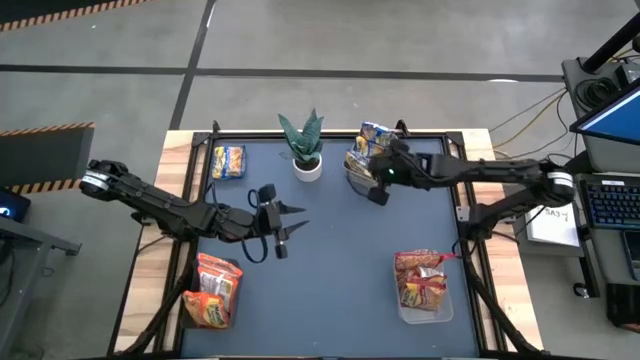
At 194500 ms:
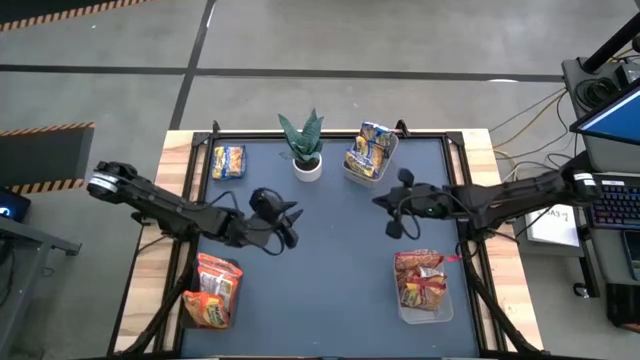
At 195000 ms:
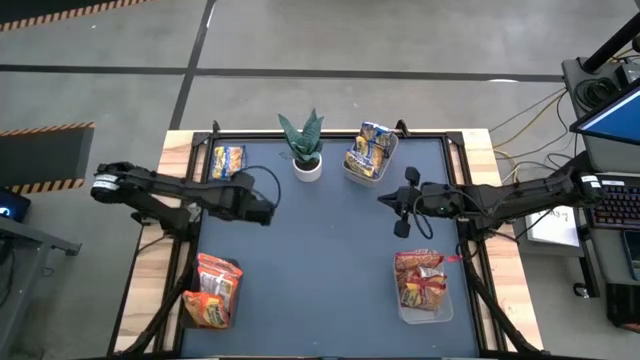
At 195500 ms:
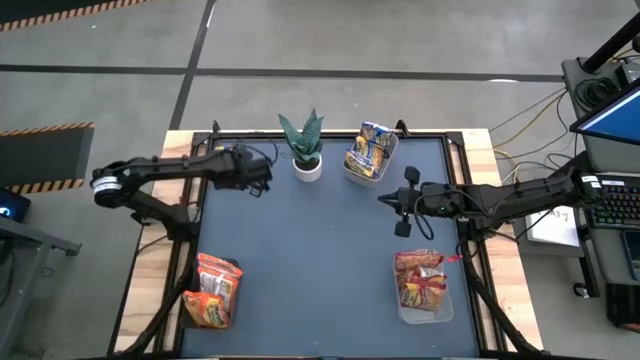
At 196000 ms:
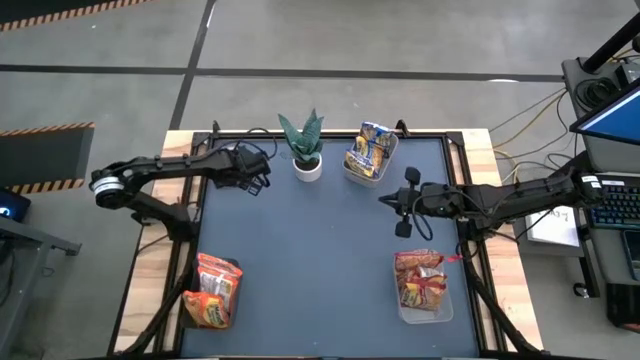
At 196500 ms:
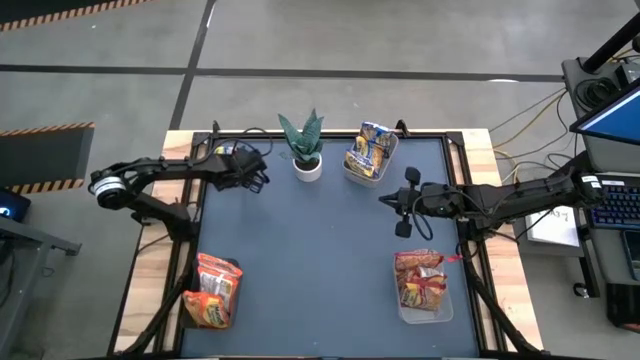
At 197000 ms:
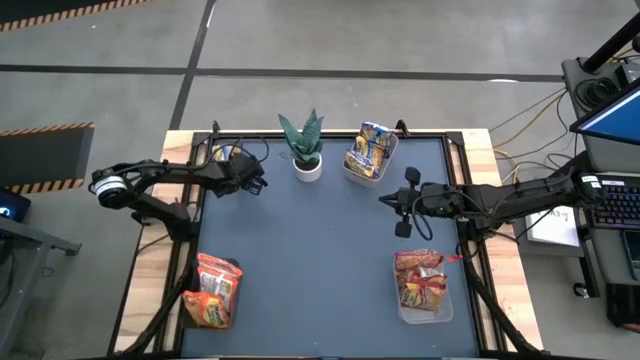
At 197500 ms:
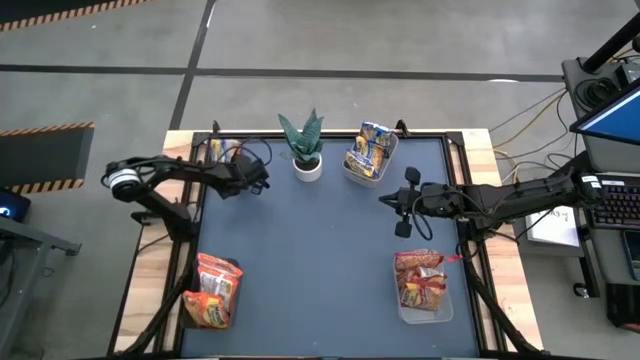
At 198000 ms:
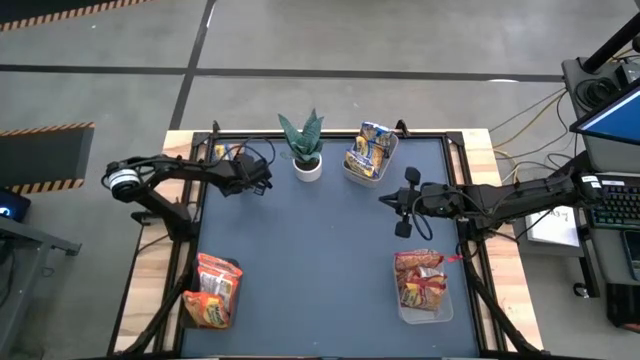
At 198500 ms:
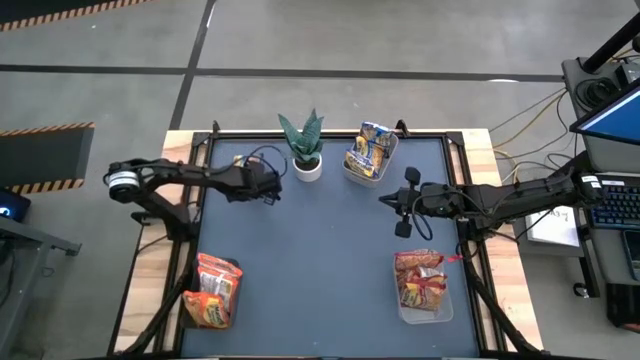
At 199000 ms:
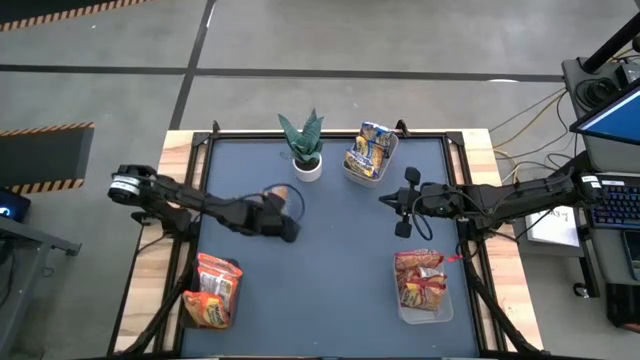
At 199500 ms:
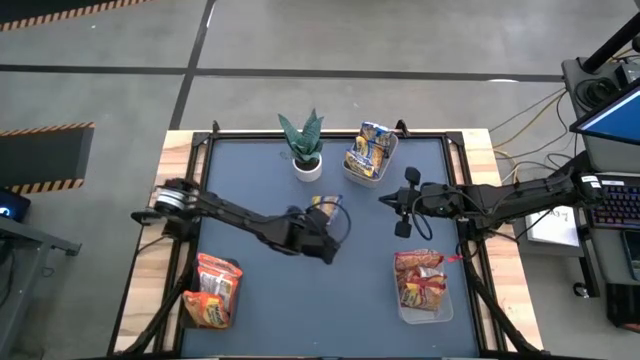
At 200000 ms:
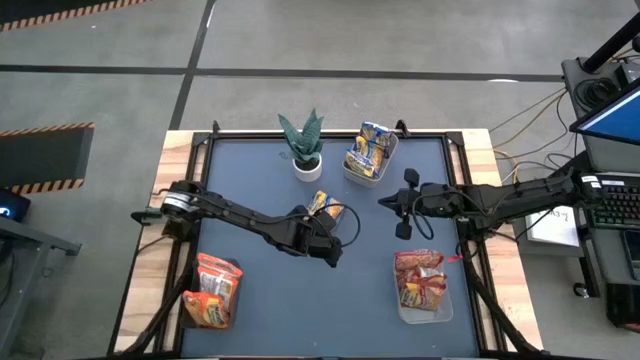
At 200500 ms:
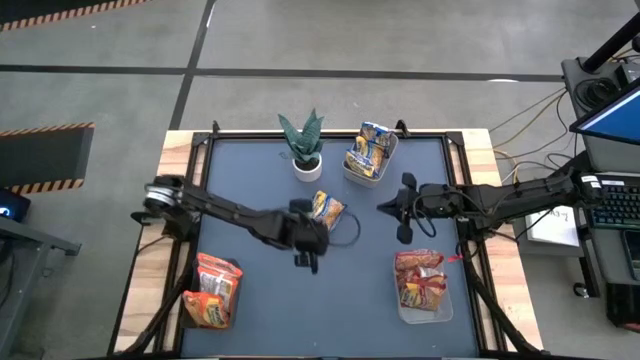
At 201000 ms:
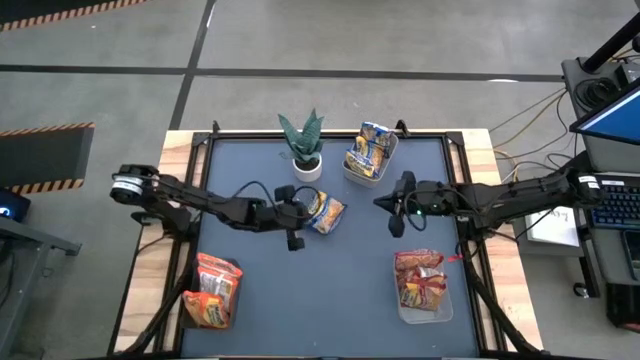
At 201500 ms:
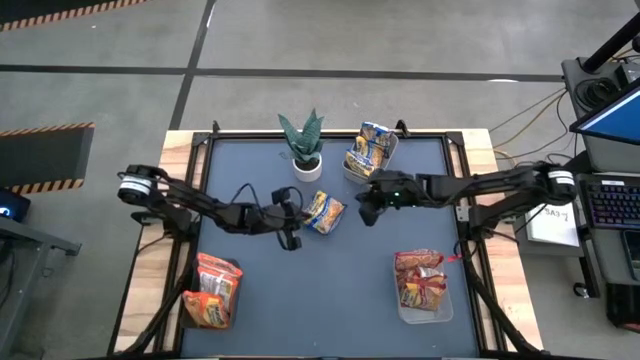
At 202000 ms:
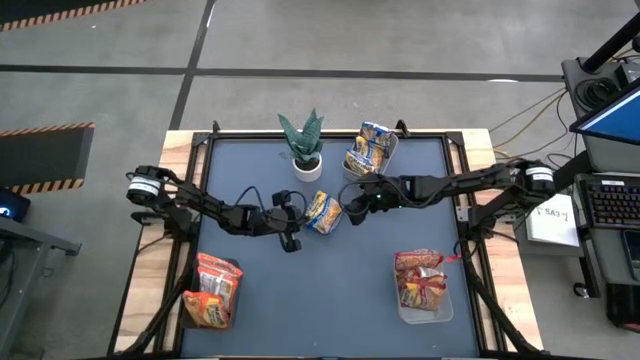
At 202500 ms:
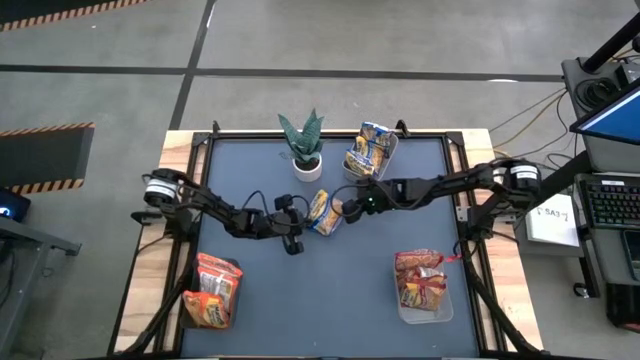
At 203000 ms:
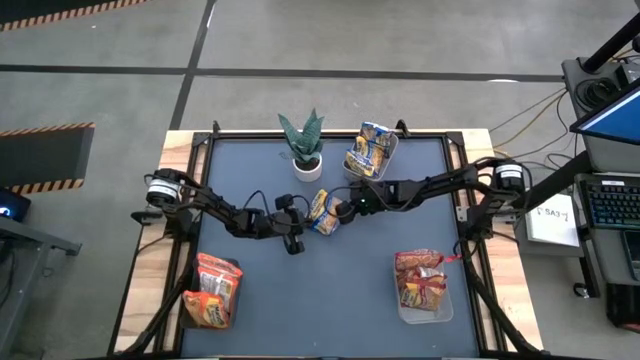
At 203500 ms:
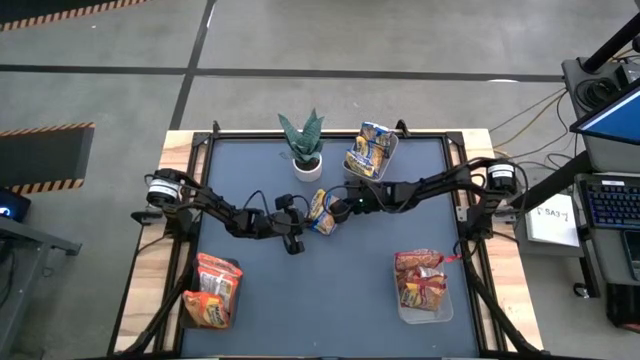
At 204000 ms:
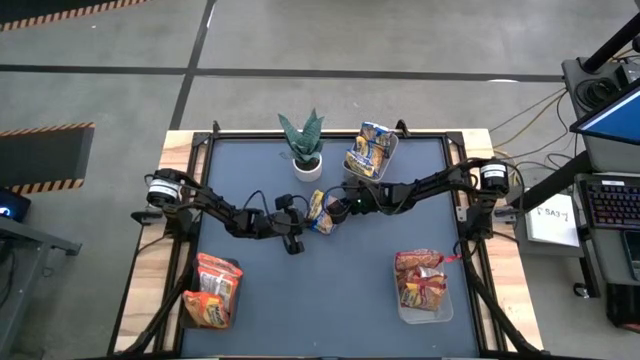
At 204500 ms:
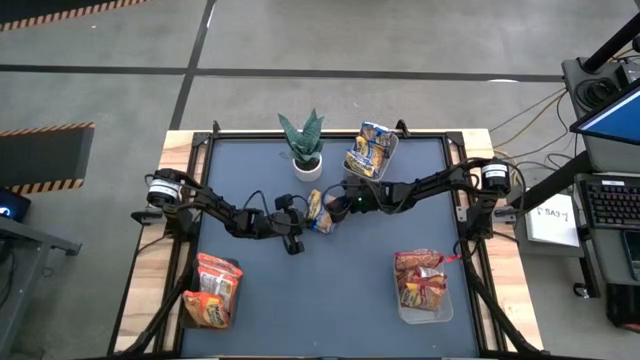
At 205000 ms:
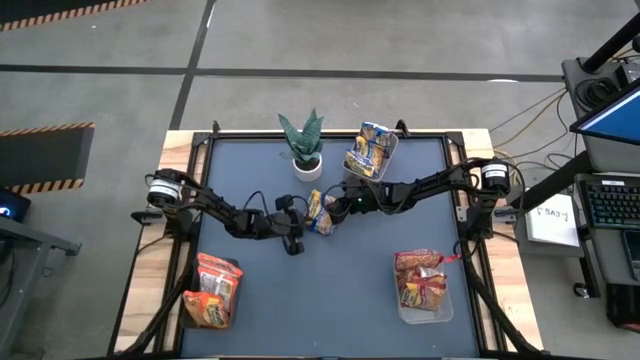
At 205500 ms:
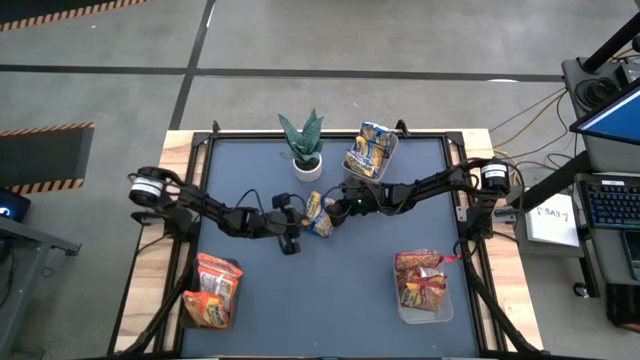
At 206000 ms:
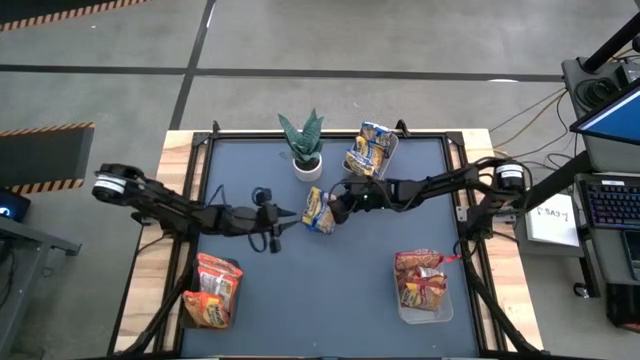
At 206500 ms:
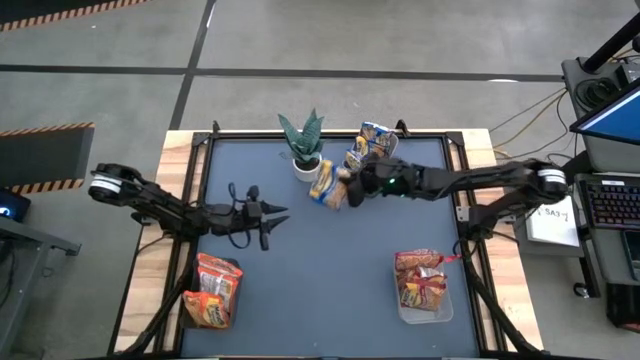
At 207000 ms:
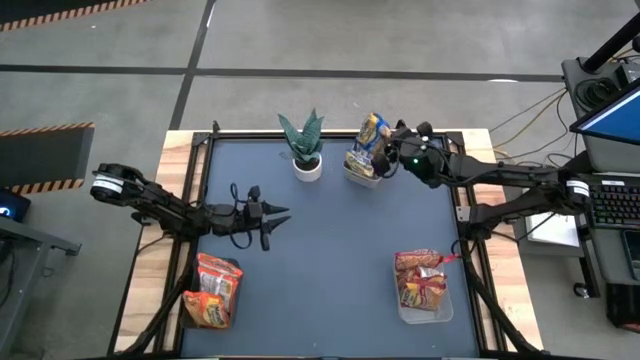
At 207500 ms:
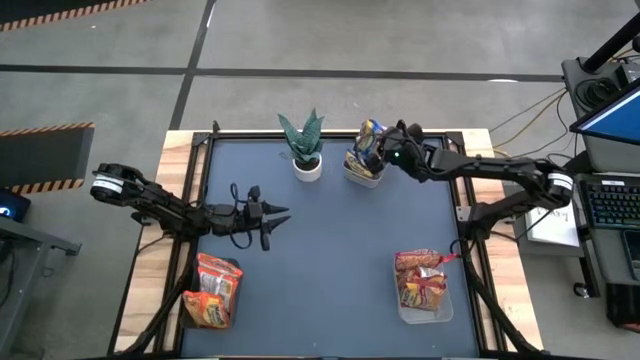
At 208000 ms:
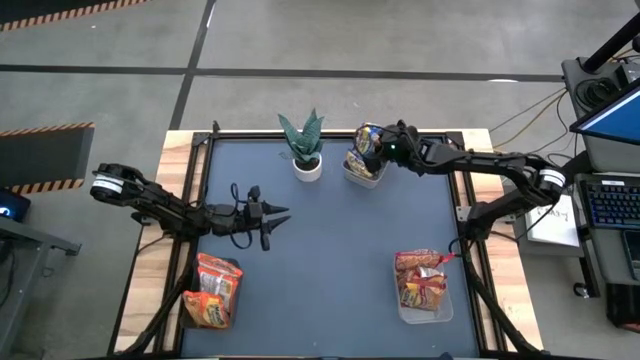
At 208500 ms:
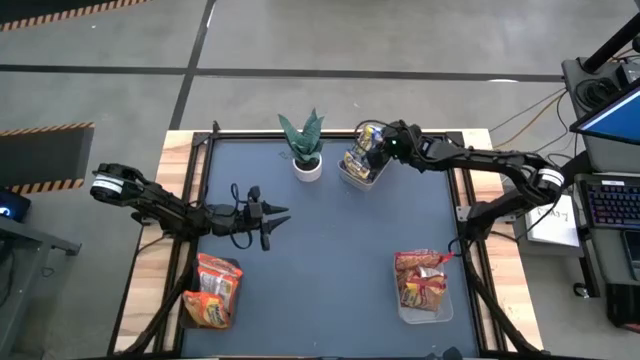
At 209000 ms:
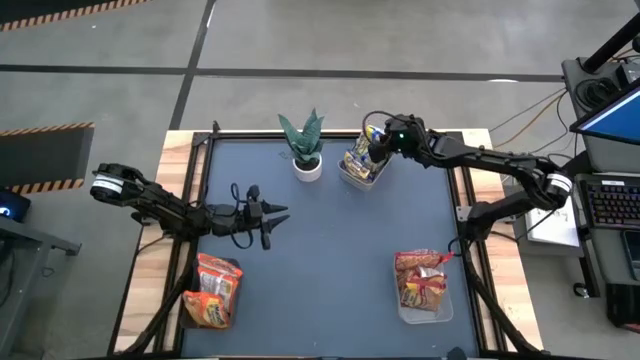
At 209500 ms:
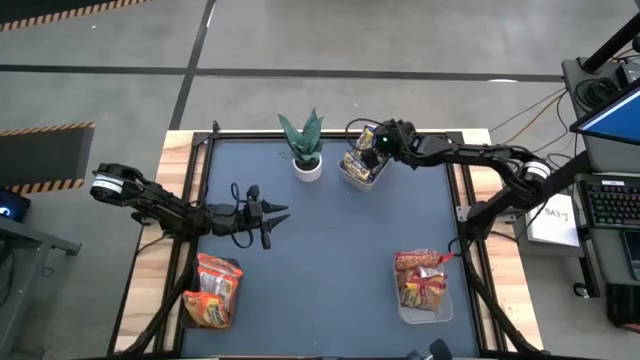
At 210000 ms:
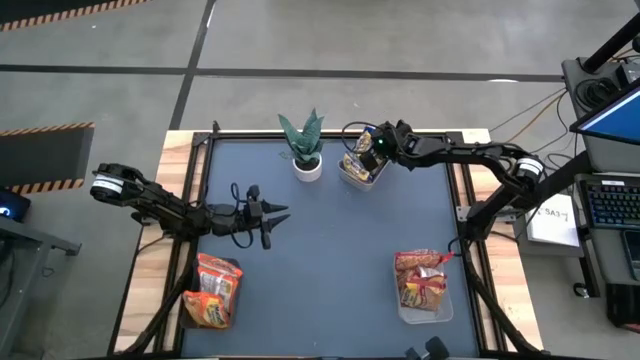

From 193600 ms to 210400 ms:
Task: Sort Maruchan noodles
Put the blue instant noodle pack into the gray bin

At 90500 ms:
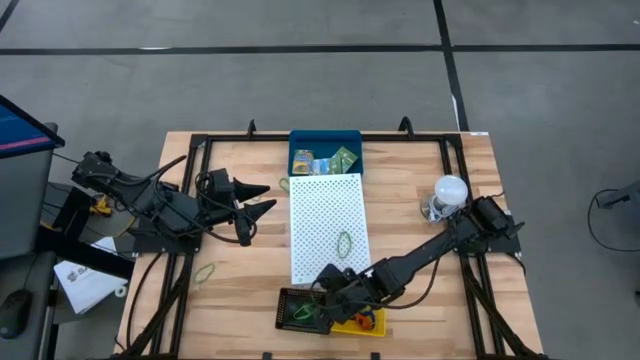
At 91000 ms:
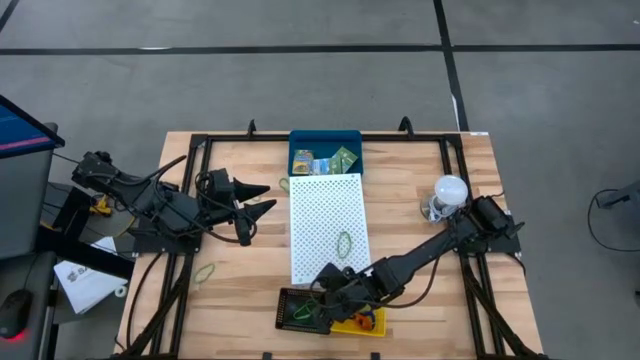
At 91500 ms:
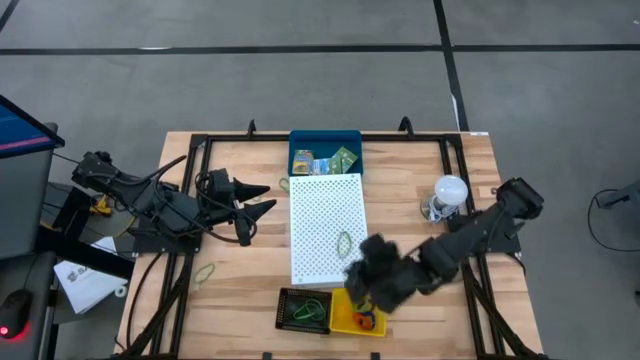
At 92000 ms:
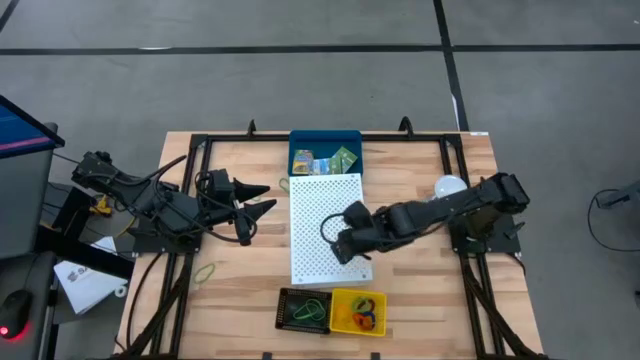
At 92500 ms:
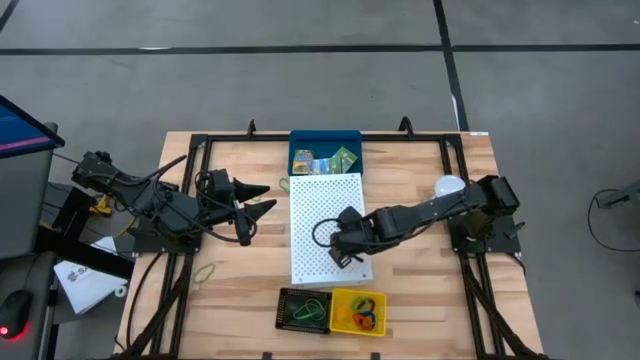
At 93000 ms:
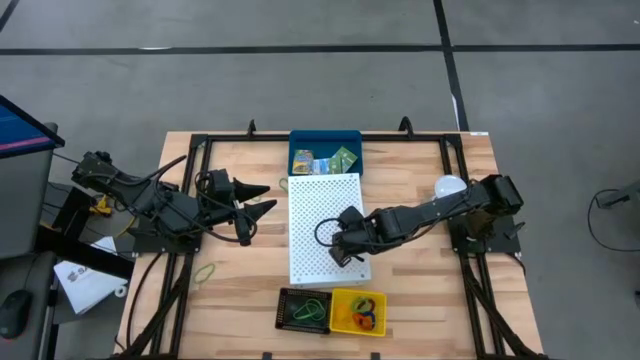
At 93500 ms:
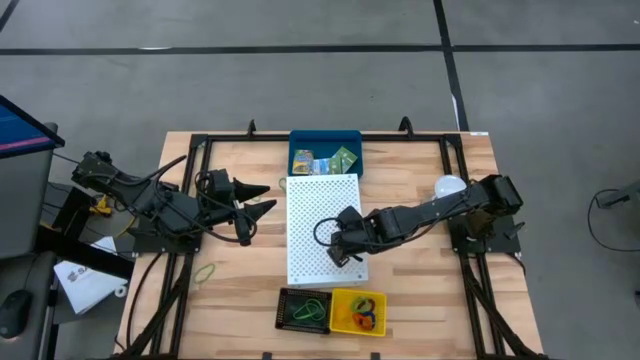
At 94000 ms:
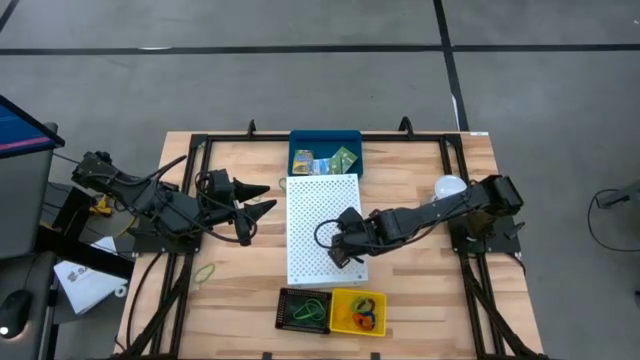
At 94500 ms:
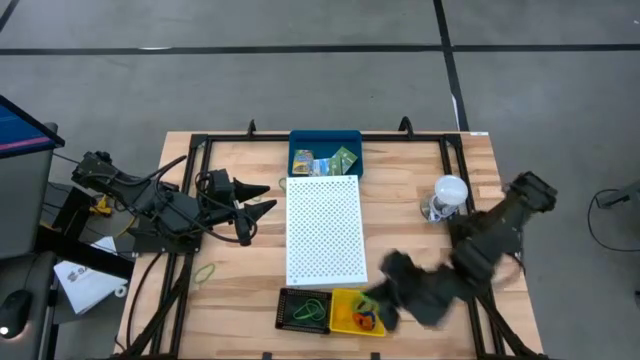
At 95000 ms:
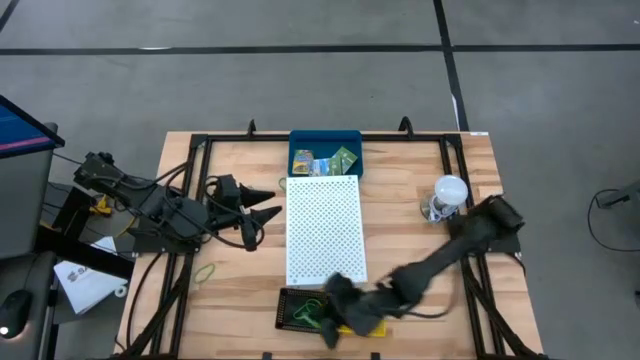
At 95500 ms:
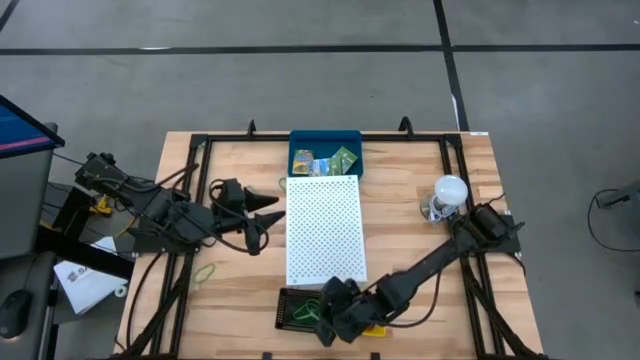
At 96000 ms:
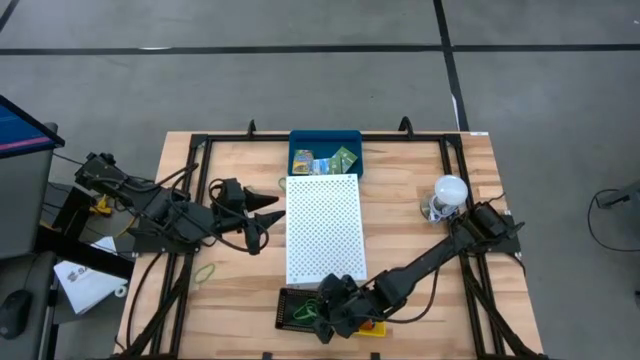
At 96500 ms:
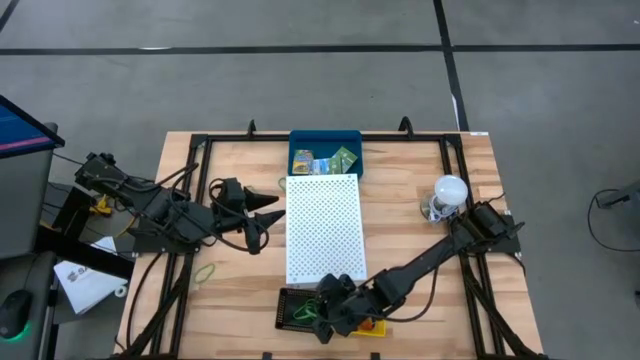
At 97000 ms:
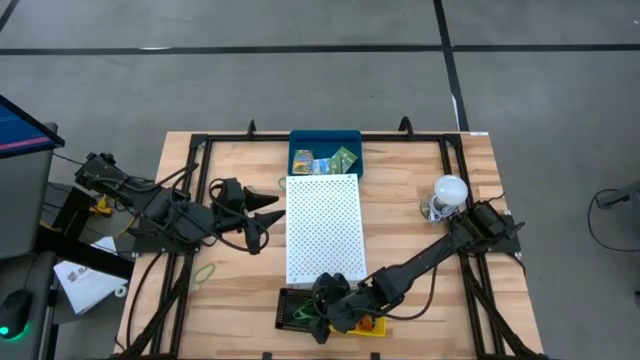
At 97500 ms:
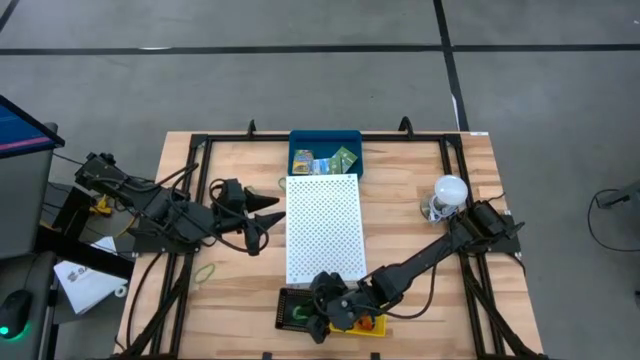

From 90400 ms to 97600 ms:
Task: Pick & Place Office Desk Supplies
Put the green rubber band into the black bin
